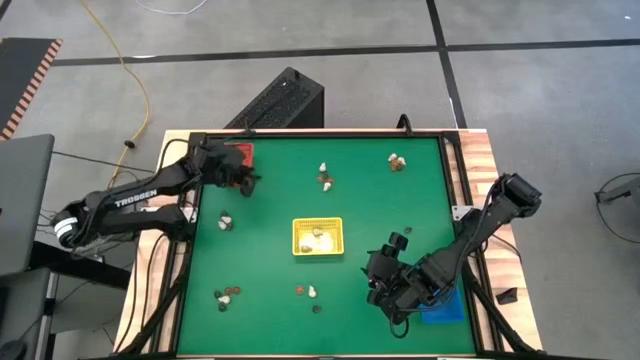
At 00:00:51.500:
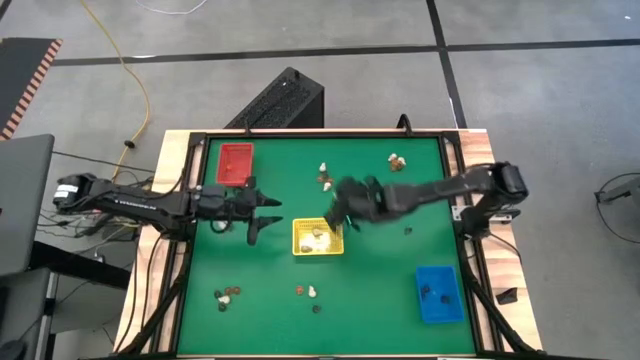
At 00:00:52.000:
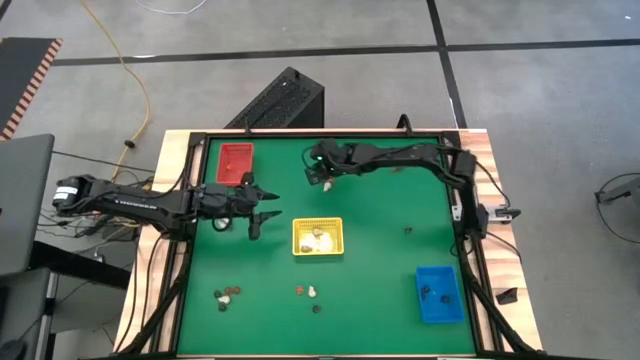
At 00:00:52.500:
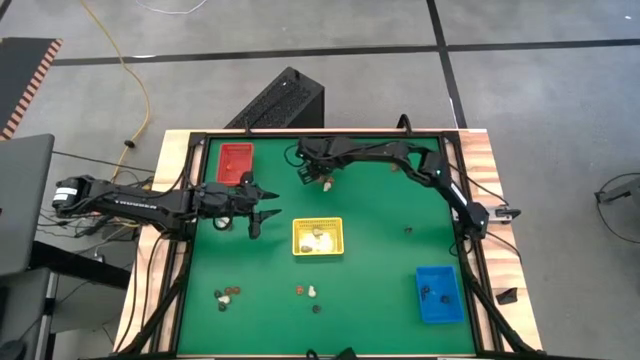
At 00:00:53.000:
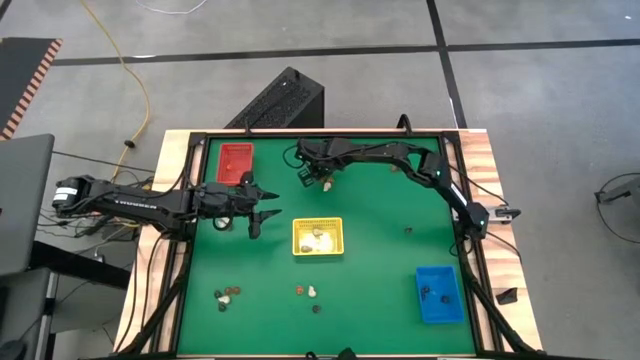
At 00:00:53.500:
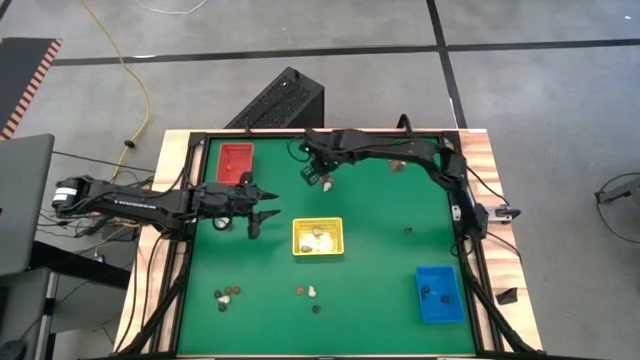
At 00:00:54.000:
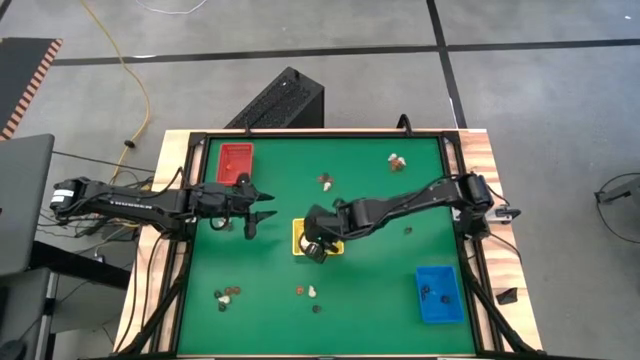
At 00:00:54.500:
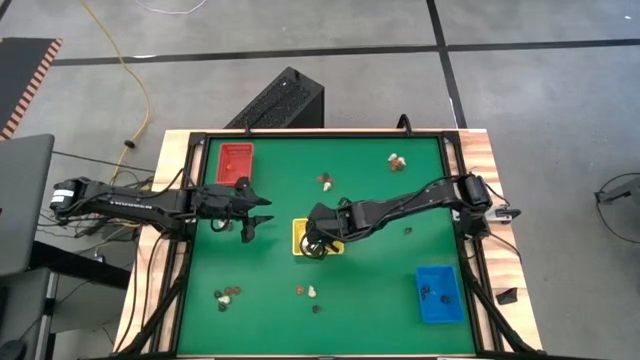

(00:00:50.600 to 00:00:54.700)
Task: Sort Halloween decoration
Put the white skull toy into the yellow bin

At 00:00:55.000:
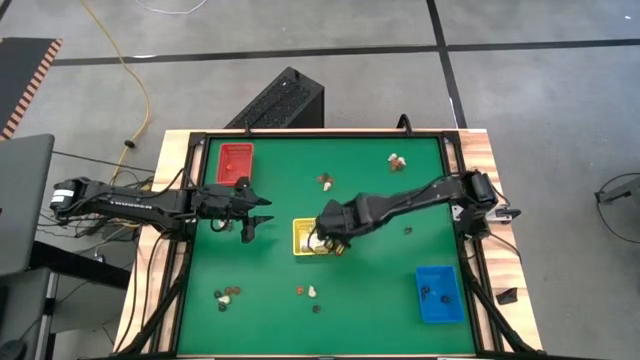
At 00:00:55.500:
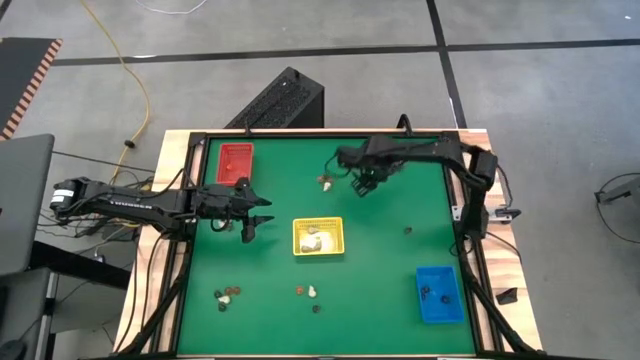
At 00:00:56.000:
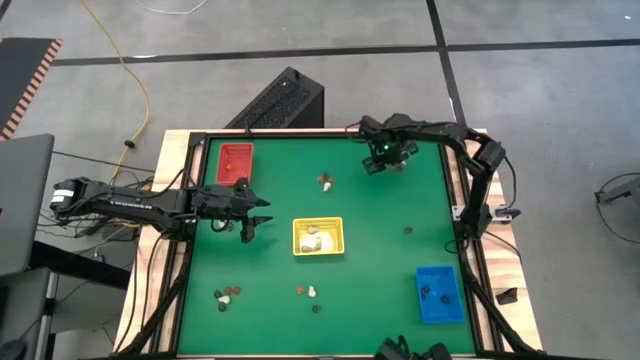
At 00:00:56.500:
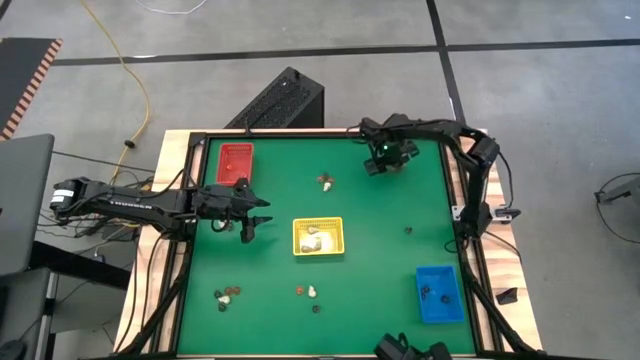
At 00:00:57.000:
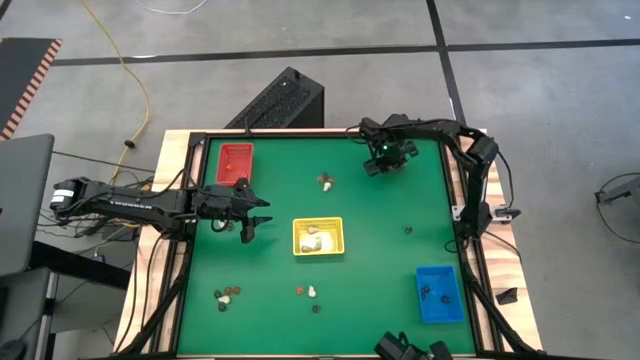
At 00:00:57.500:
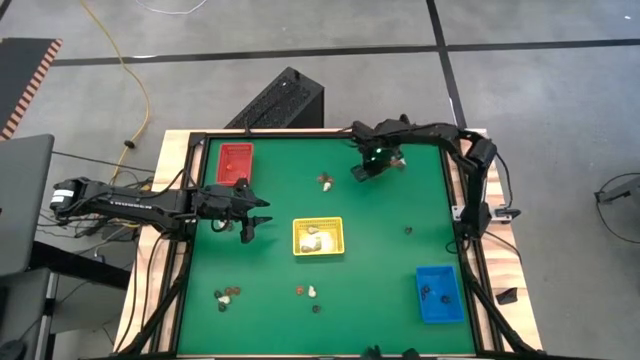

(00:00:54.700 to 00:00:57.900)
Put the orange pumpkin toy into the red bin

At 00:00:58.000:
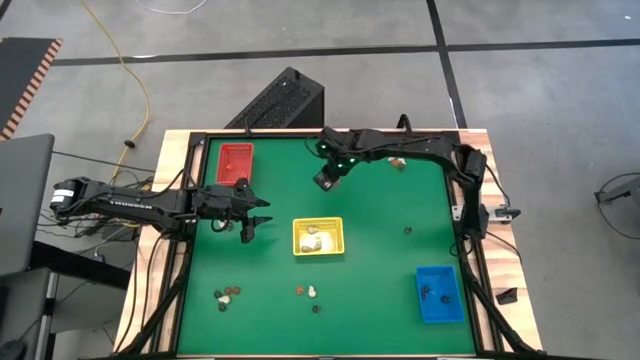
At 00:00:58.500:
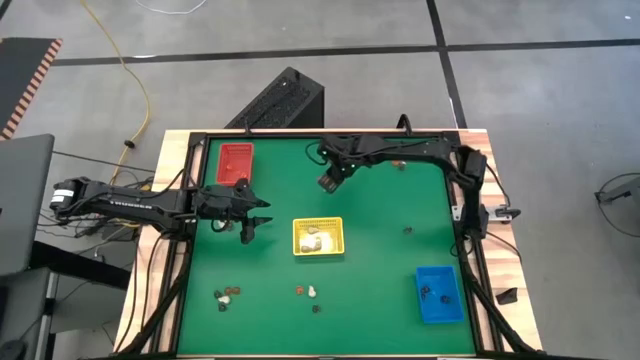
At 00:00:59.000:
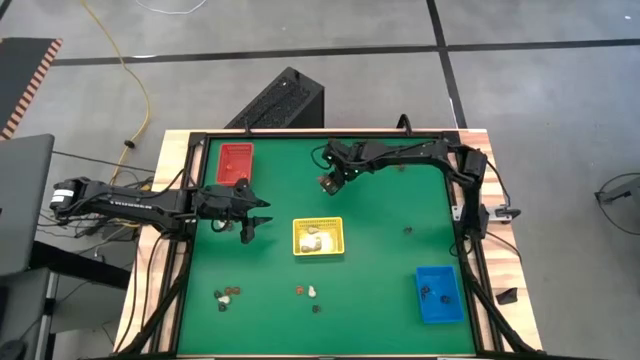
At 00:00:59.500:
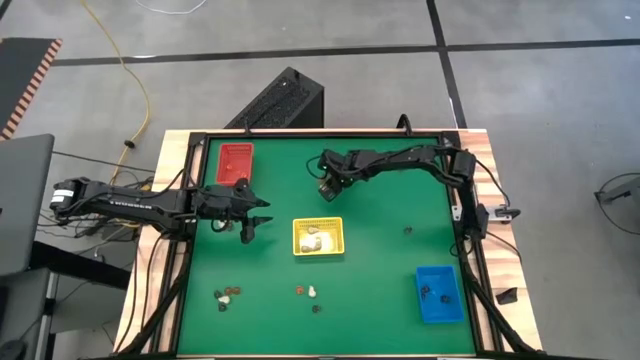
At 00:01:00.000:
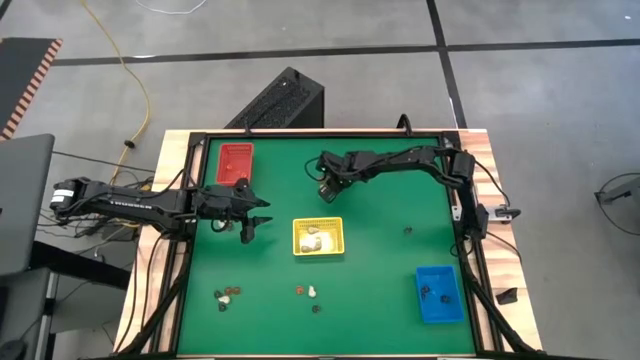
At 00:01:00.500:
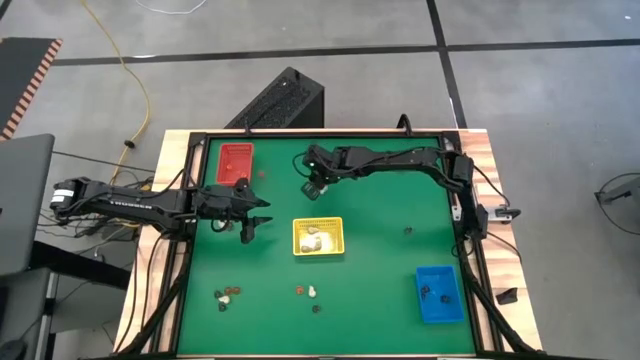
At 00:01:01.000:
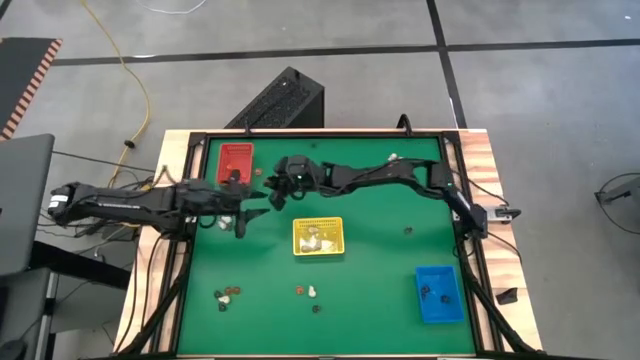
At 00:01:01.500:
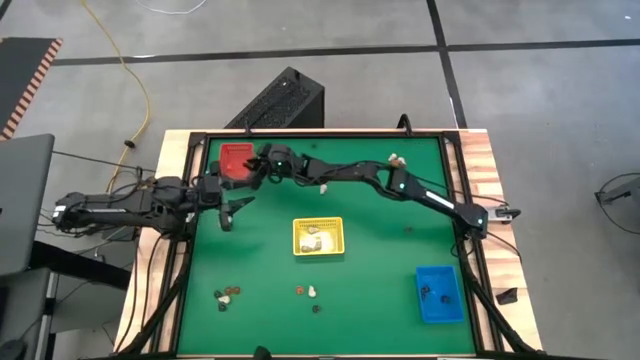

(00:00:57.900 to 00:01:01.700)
Put the orange pumpkin toy into the red bin

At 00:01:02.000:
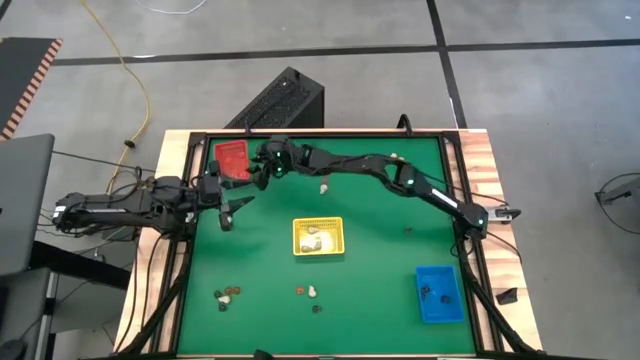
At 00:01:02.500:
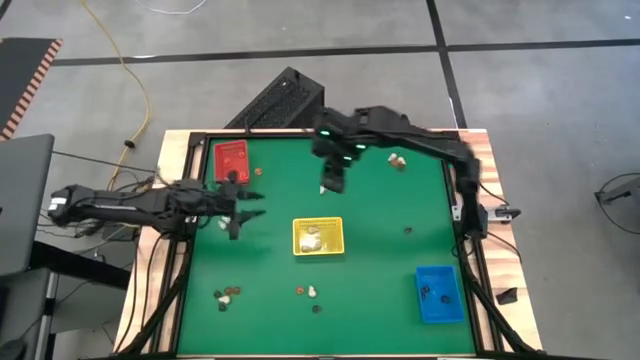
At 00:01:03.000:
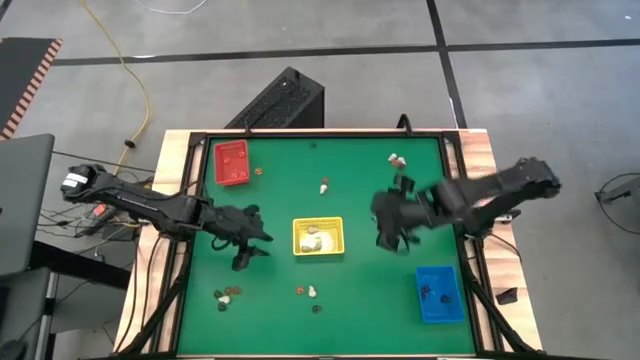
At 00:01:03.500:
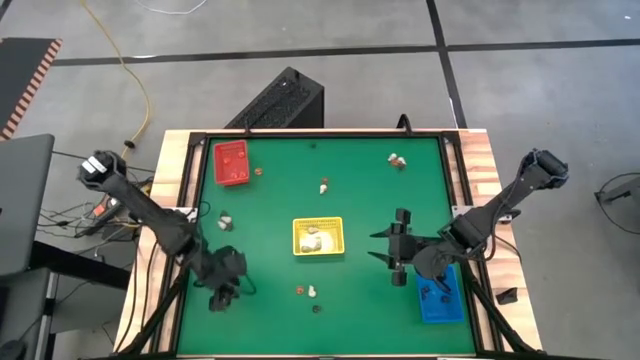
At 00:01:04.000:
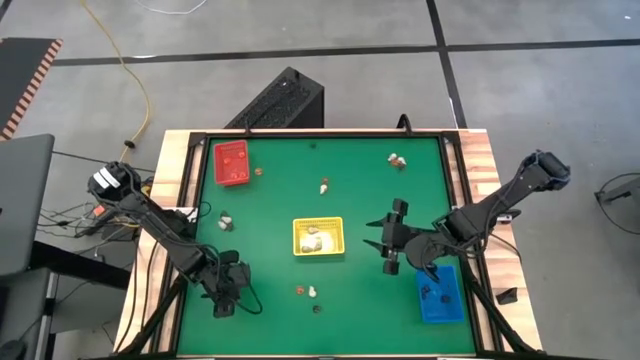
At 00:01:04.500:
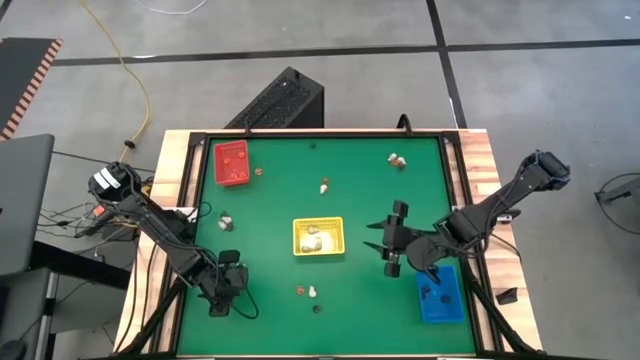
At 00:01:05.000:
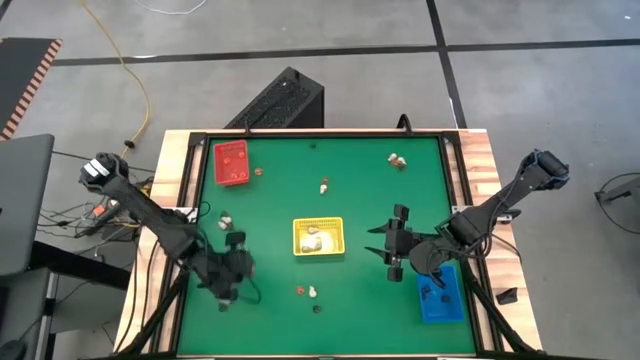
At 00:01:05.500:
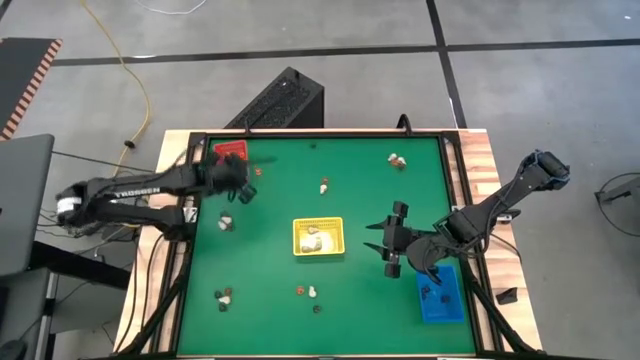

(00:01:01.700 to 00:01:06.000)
Put the orange pumpkin toy into the red bin

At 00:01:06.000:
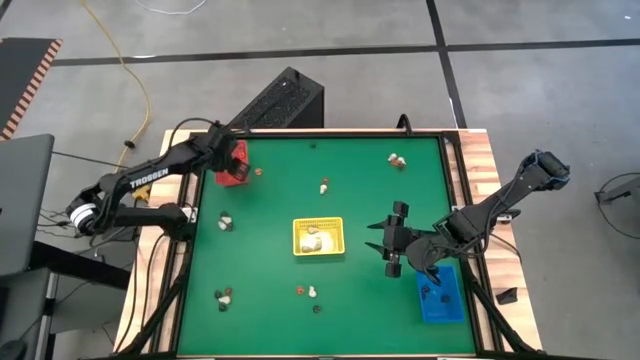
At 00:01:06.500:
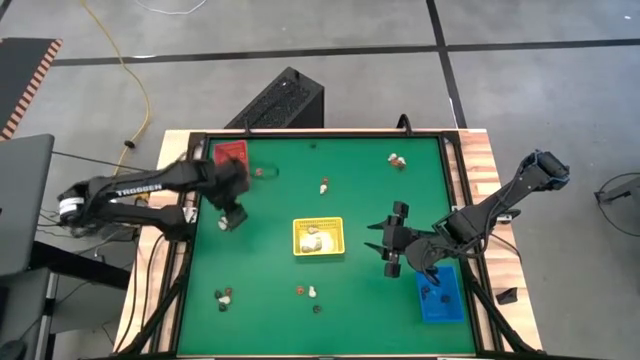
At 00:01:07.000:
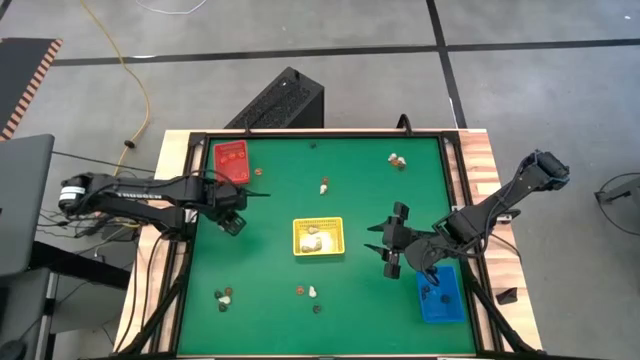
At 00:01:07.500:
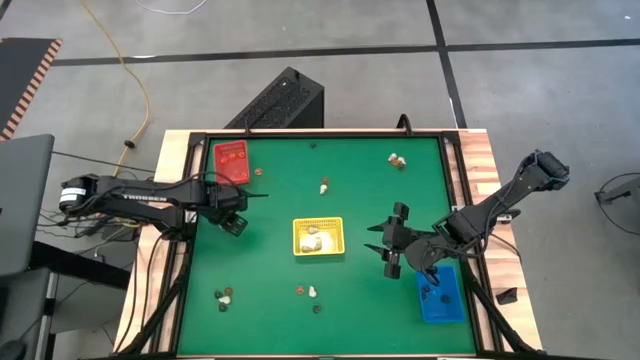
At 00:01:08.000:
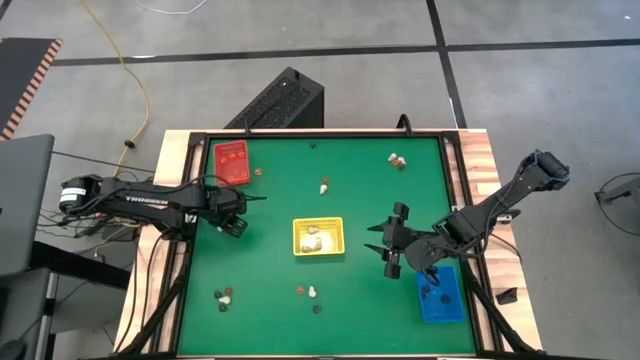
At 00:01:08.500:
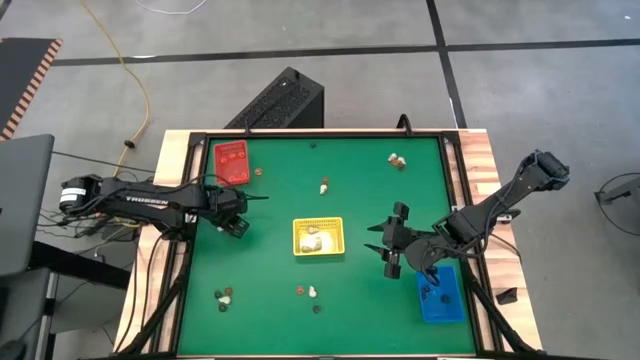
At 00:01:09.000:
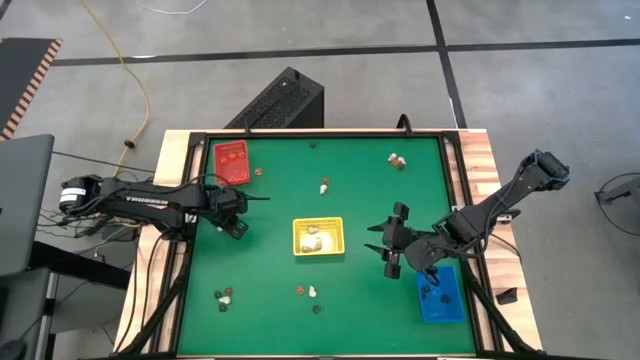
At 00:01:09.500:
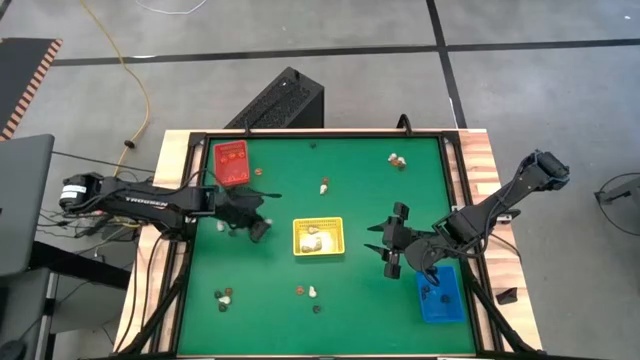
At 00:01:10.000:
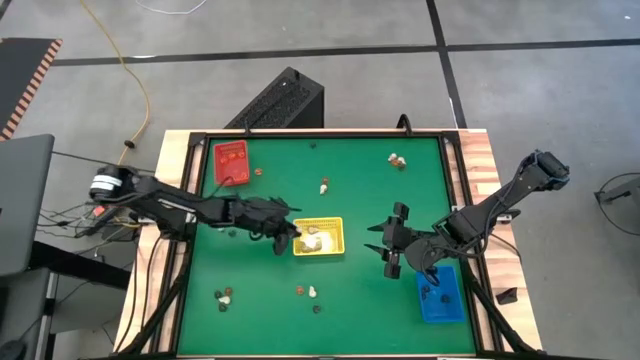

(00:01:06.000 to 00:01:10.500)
Put the white skull toy into the yellow bin

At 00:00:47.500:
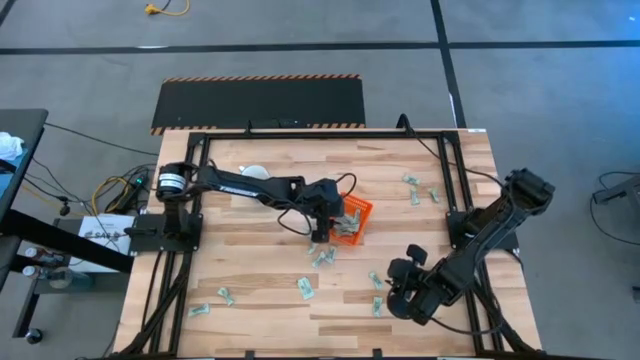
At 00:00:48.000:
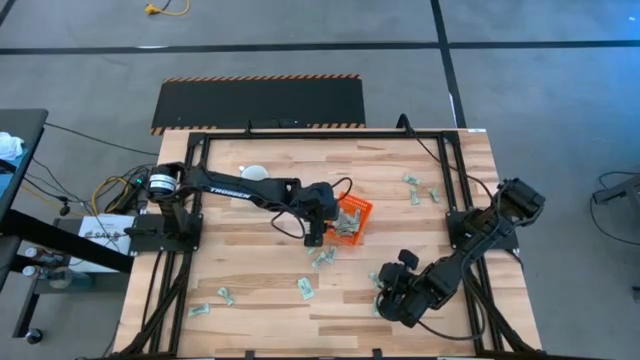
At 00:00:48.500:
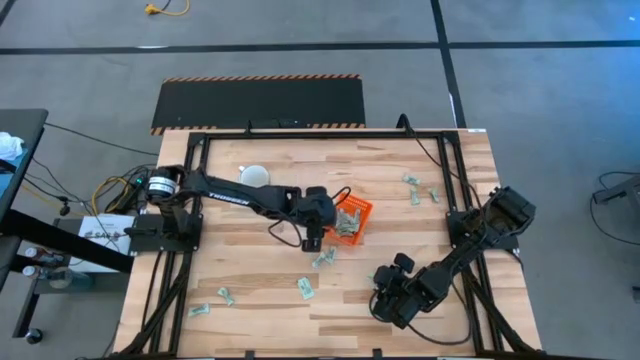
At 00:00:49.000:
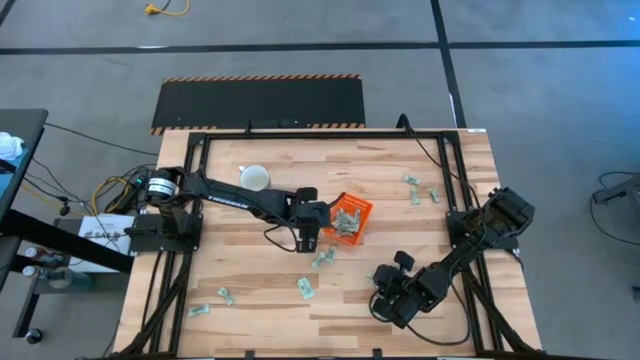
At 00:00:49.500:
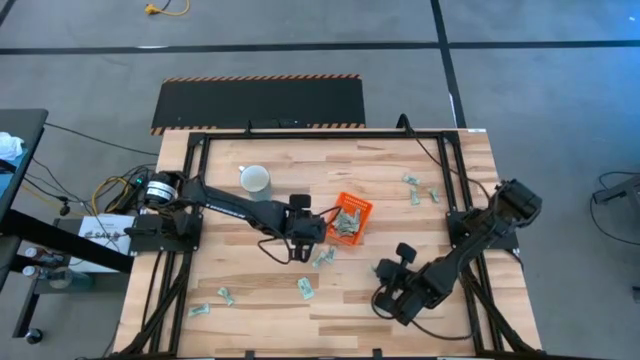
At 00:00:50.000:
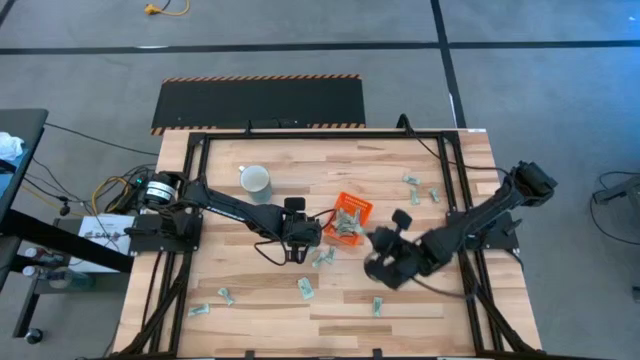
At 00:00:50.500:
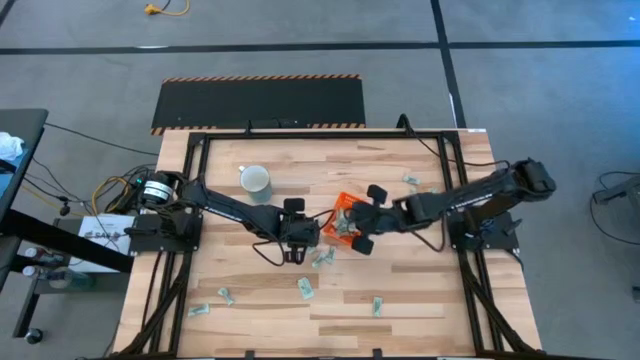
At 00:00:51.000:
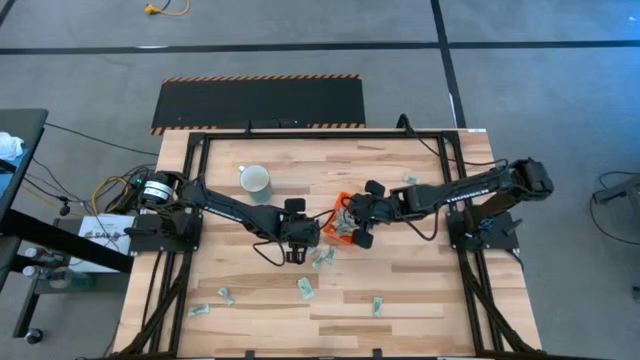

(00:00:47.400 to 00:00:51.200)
Task: Pick and place Stevia / Truvia into bins
Put the stevia packet into the basket
